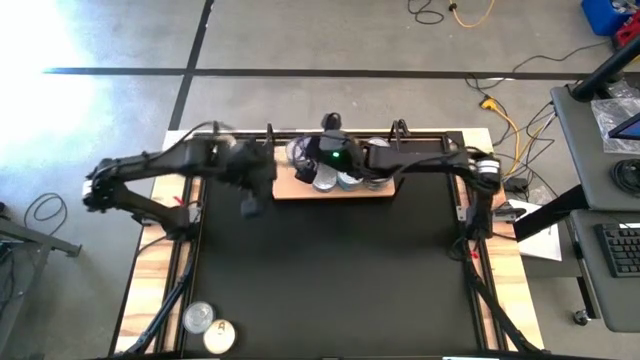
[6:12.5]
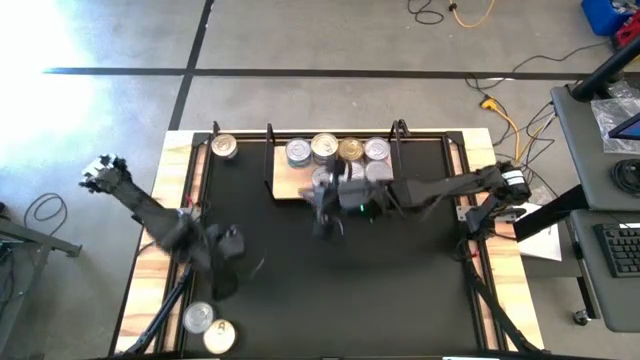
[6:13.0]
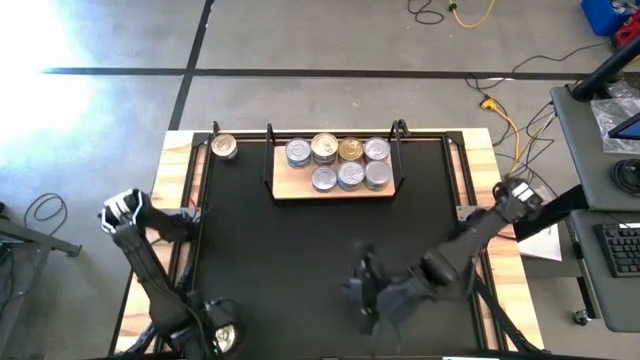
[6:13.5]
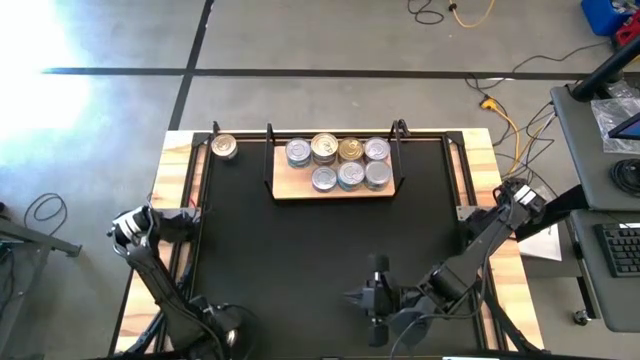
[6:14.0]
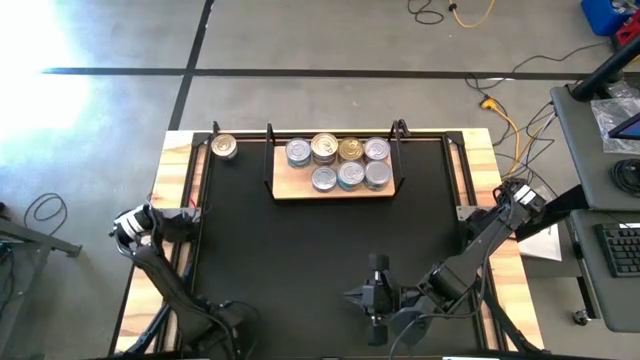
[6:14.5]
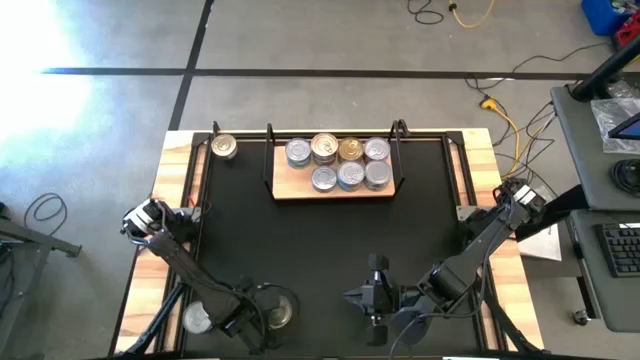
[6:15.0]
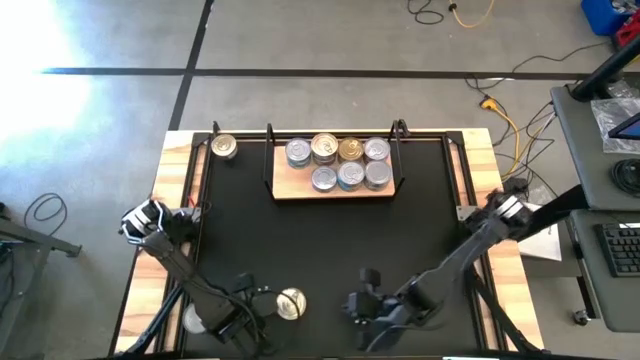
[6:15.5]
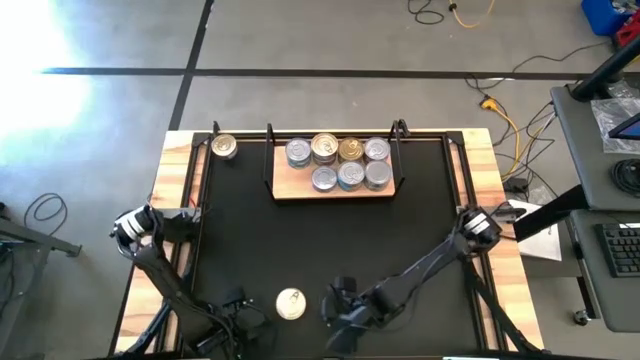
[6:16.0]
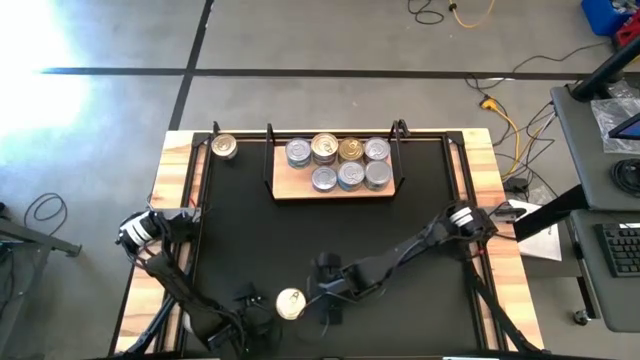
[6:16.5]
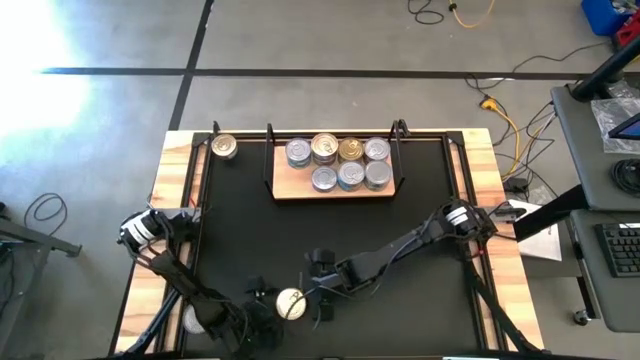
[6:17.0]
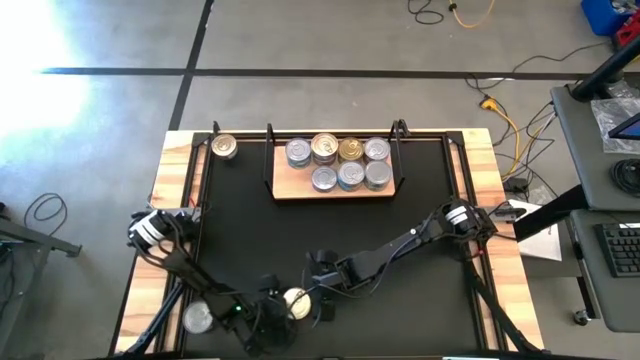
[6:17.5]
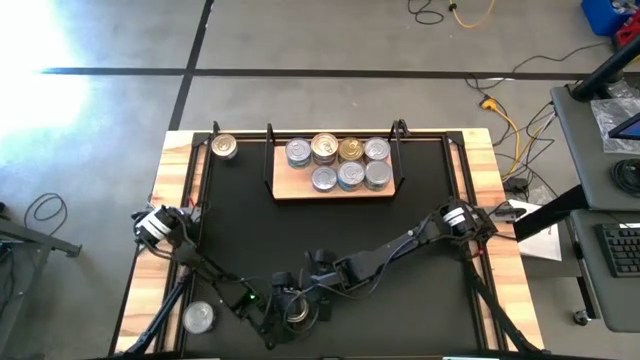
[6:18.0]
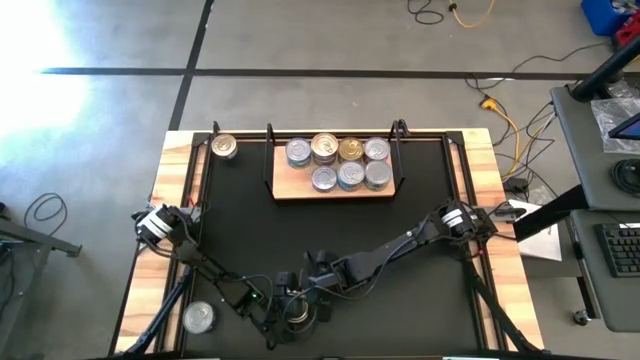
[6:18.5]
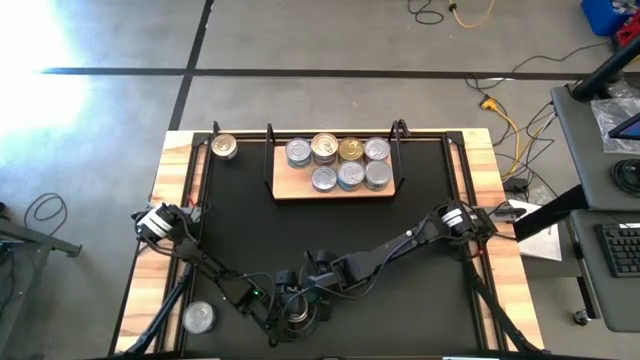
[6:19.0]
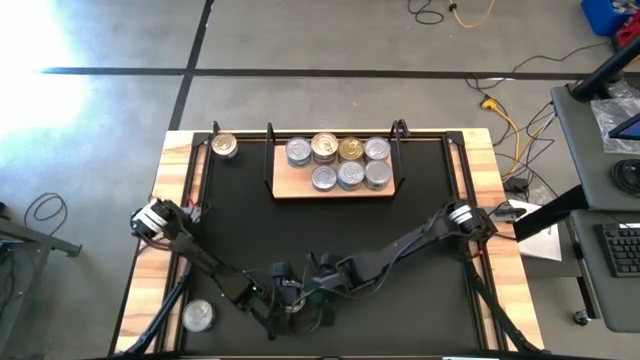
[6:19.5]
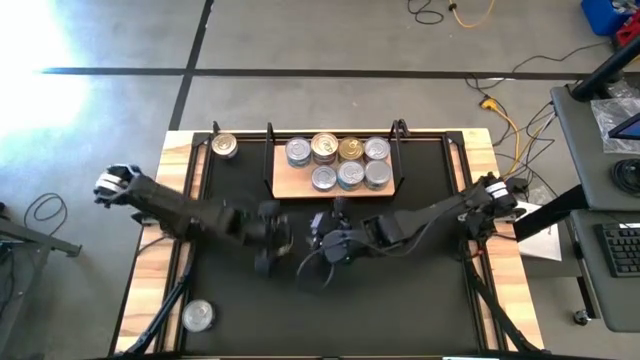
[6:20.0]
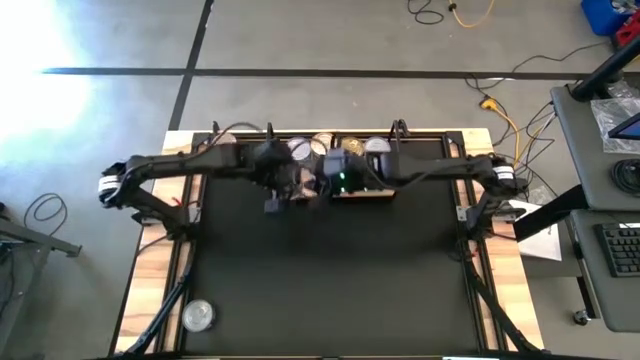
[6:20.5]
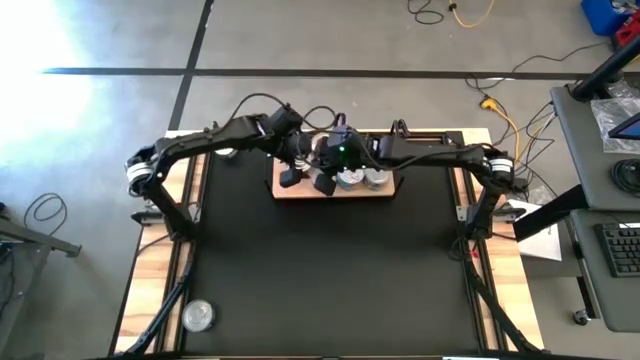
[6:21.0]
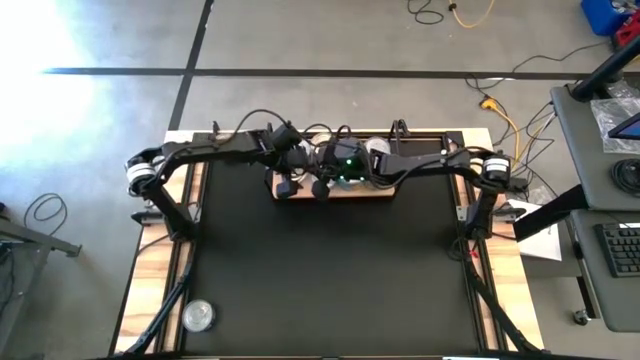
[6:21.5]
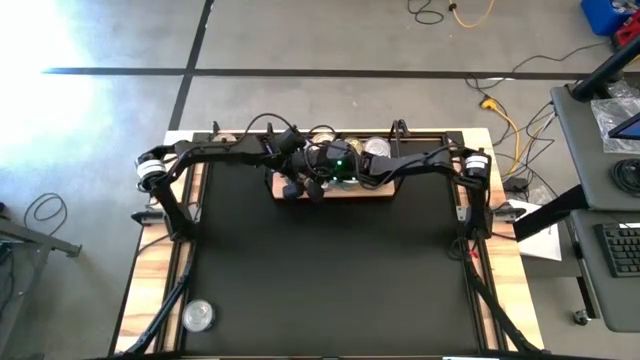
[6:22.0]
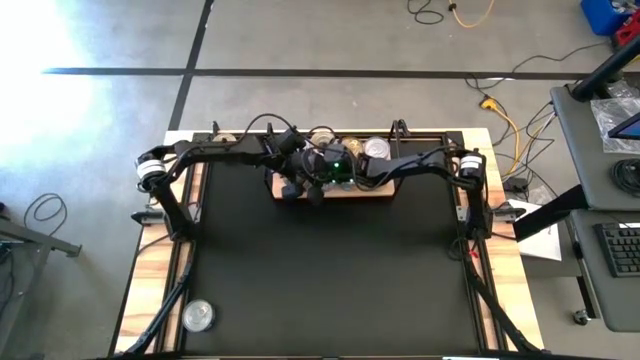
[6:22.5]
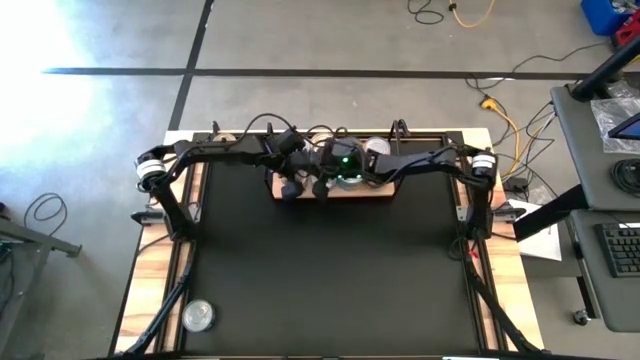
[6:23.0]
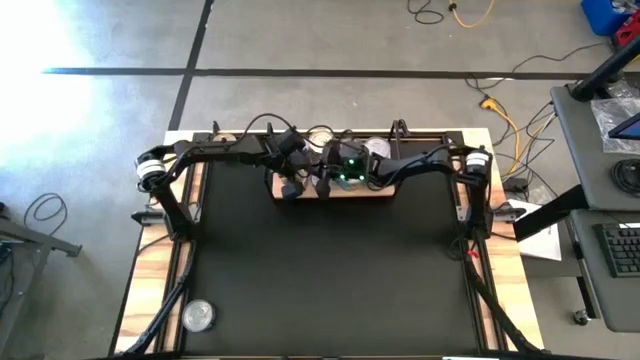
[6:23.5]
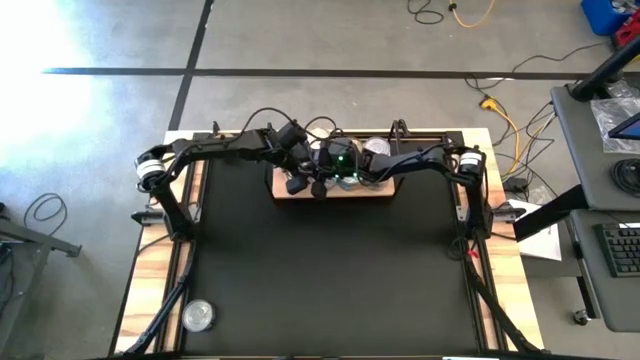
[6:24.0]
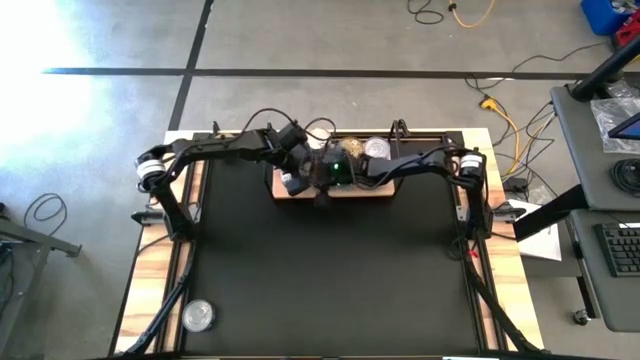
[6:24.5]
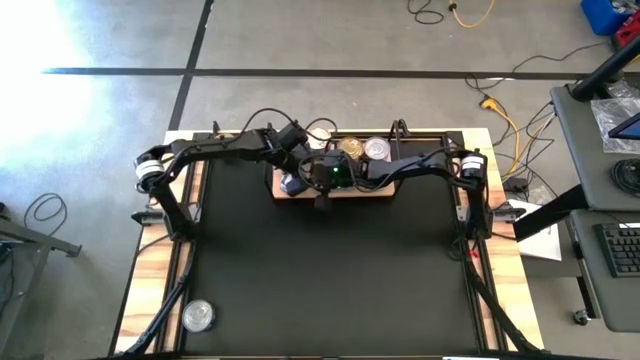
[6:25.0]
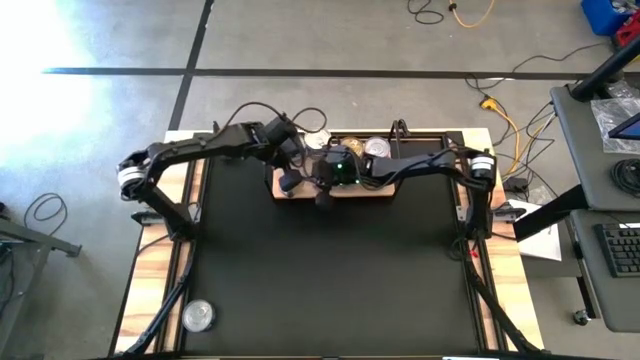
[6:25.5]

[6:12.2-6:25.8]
Task: Stack canned seafood by type on shelf
Put the blue-pink tuna can on the shelf

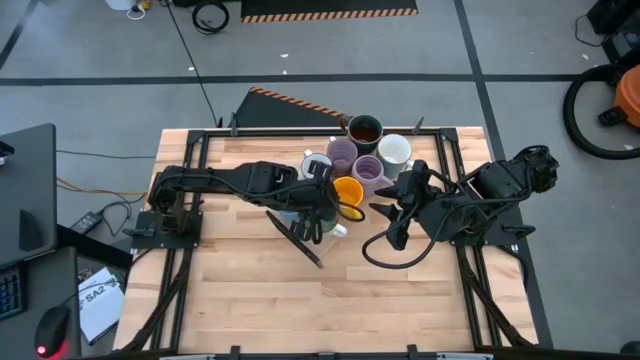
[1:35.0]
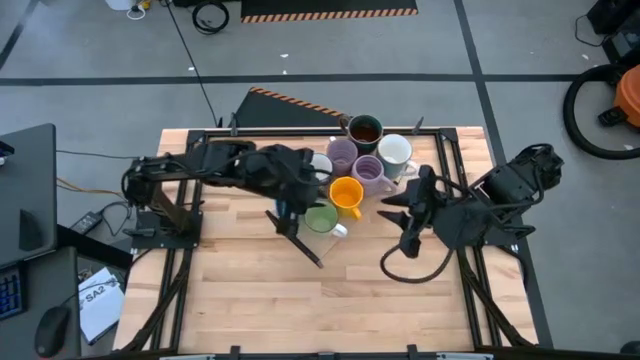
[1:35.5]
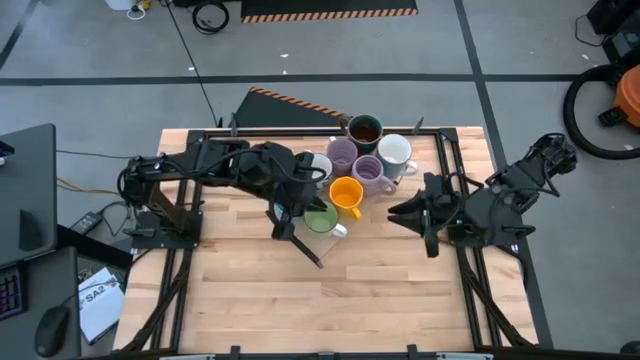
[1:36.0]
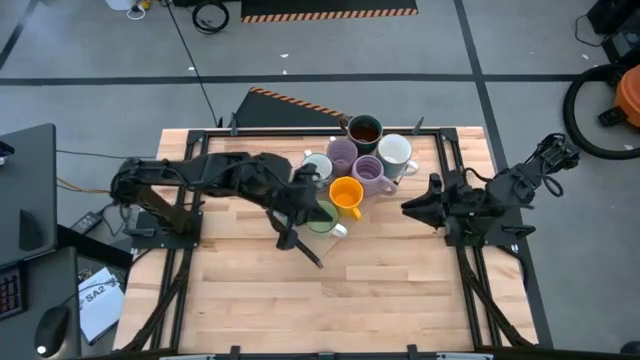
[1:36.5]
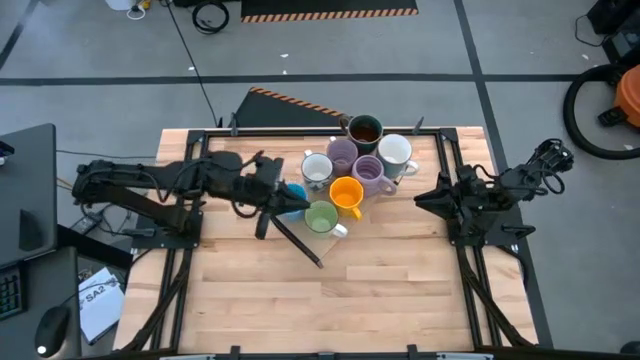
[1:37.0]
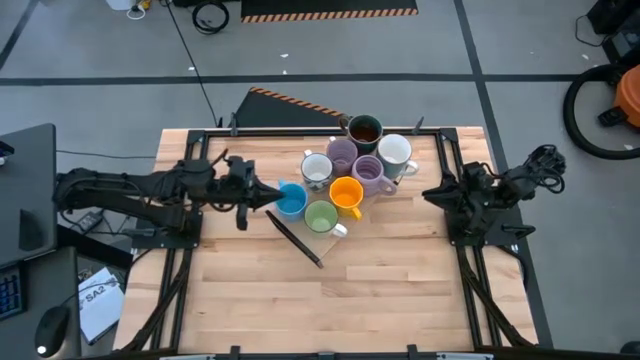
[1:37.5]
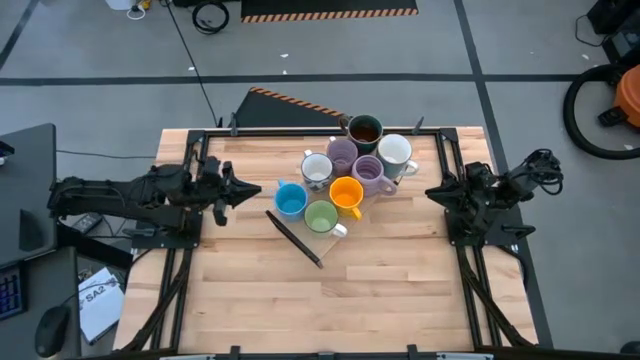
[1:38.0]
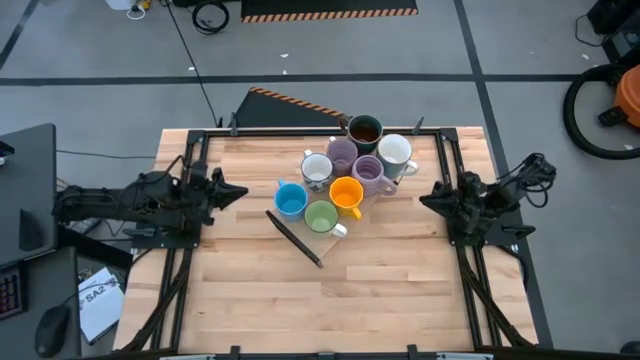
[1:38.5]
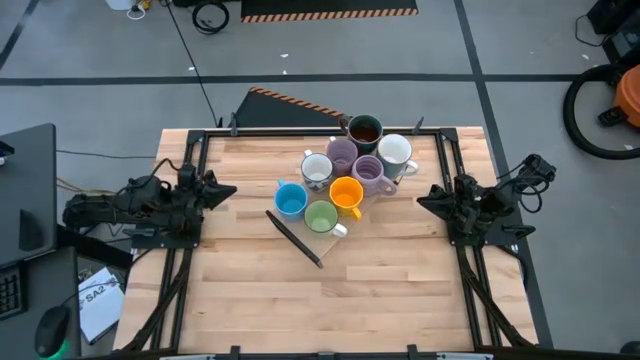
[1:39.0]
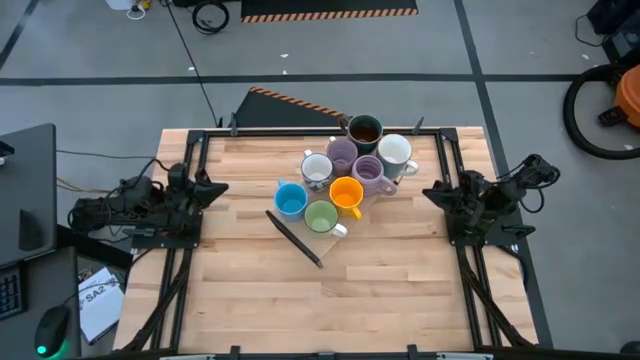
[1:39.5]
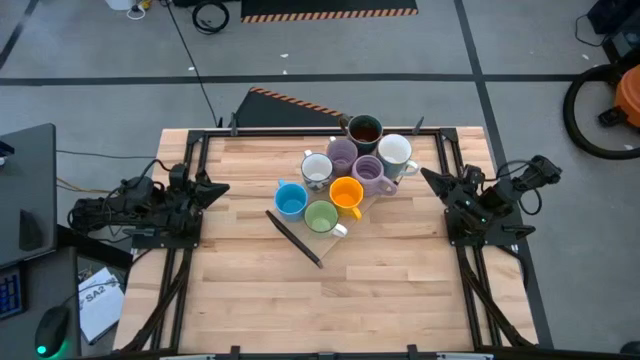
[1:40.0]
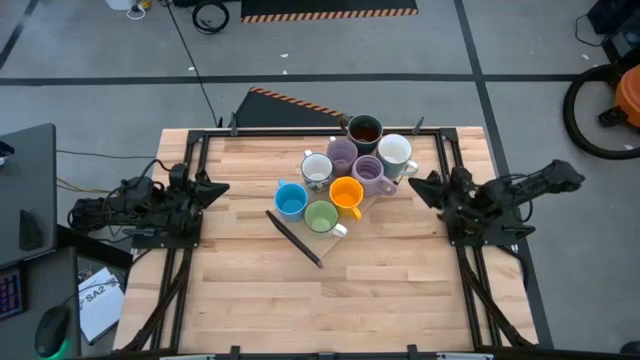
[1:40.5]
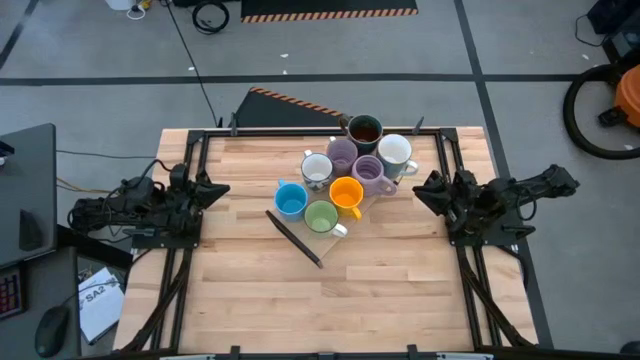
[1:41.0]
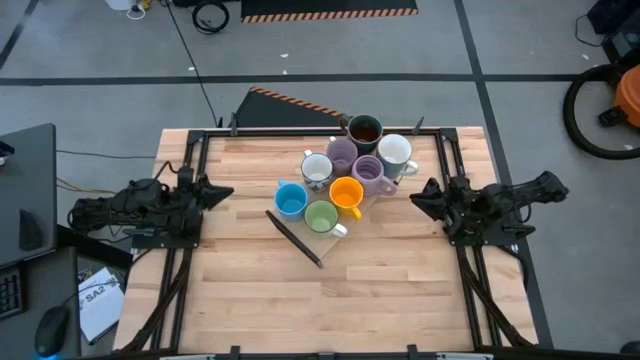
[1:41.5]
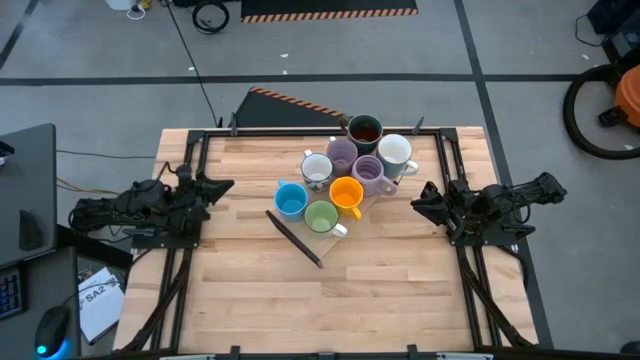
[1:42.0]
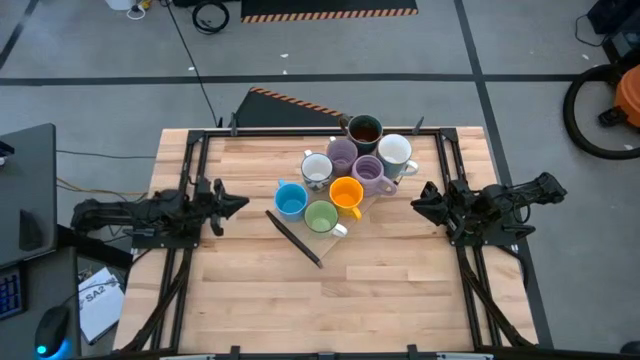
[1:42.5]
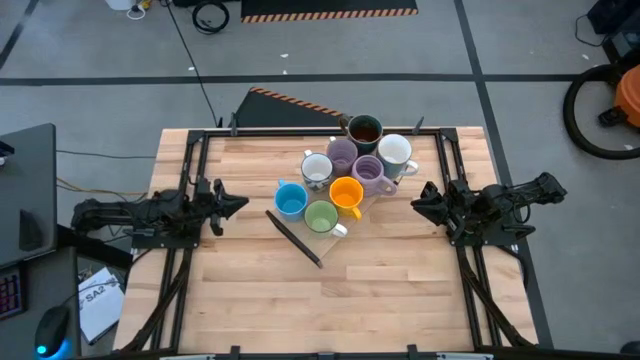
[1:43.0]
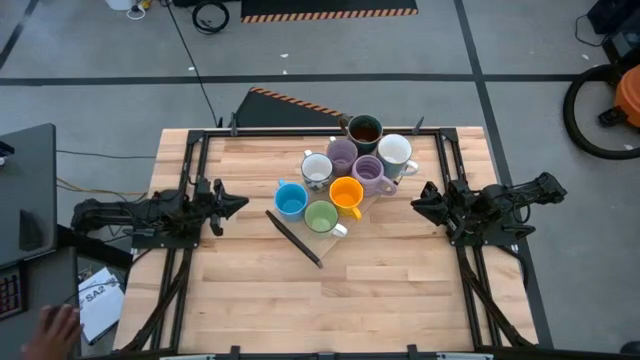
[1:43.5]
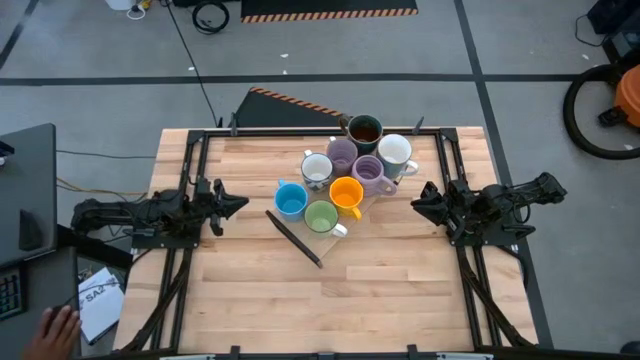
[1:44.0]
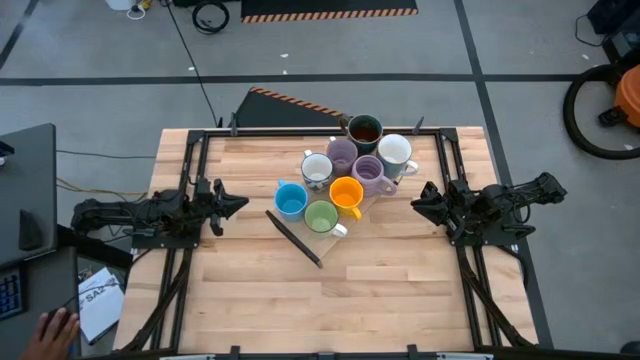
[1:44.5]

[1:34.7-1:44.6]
Task: Place coffee mugs
Return to Home Position
